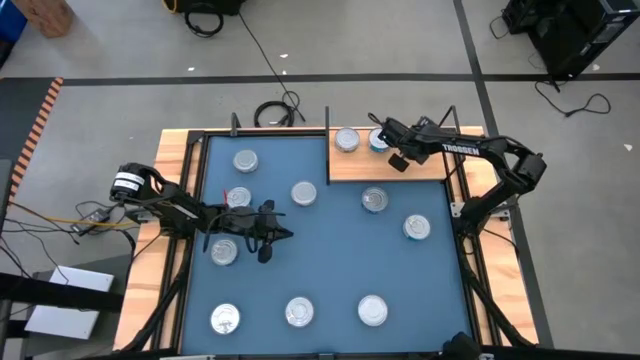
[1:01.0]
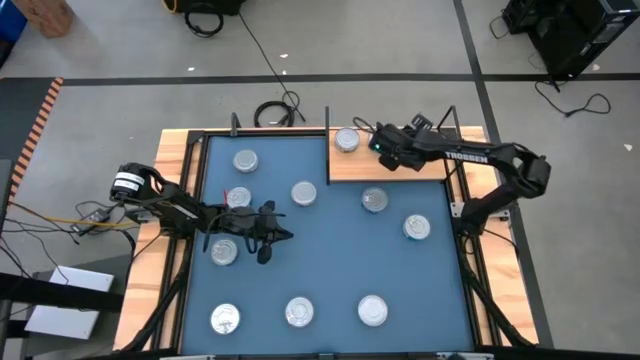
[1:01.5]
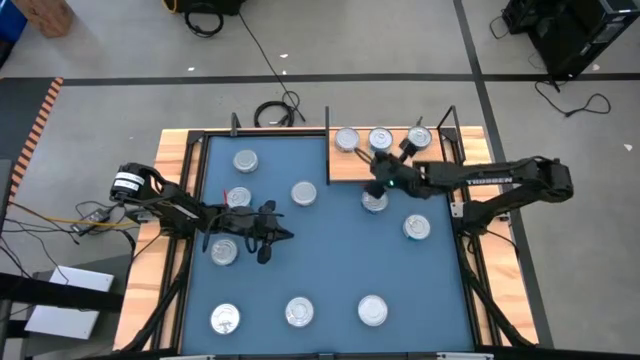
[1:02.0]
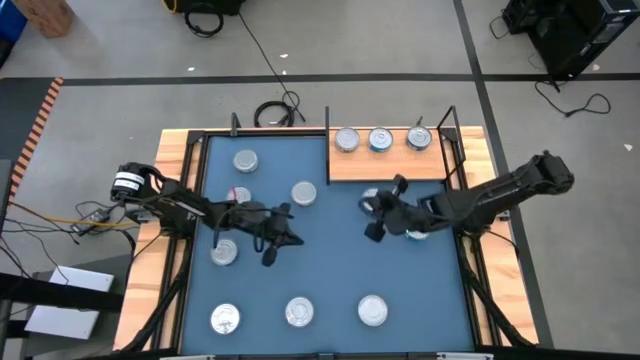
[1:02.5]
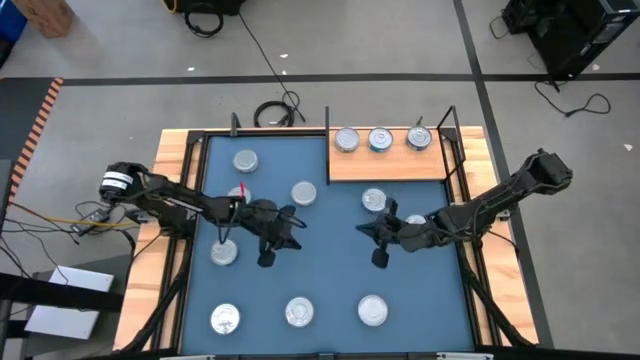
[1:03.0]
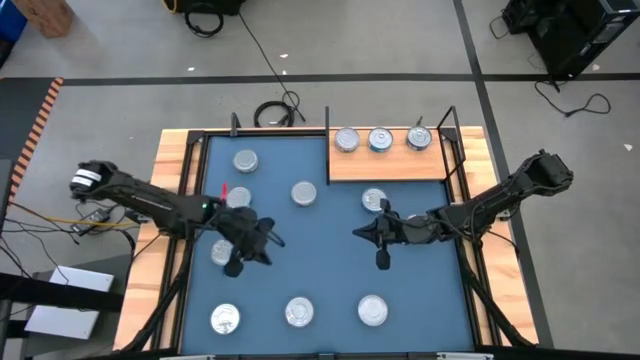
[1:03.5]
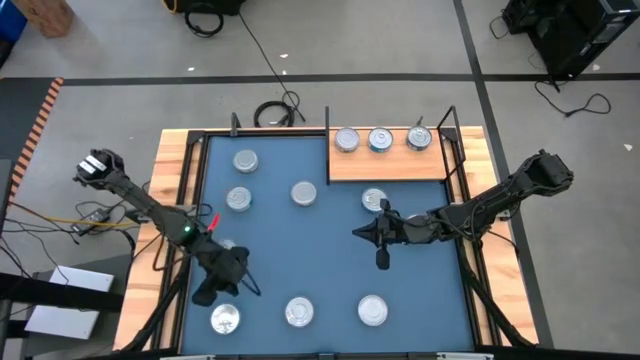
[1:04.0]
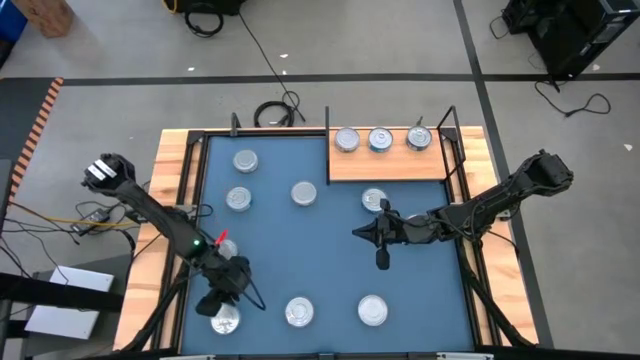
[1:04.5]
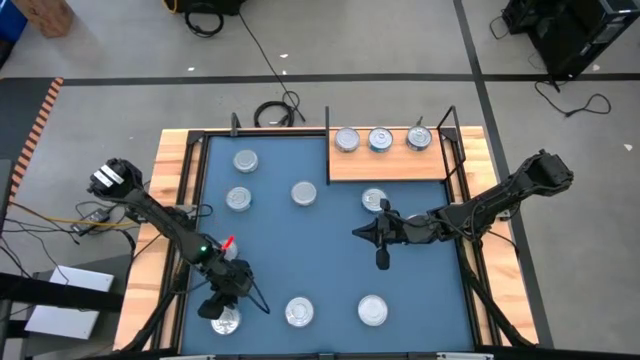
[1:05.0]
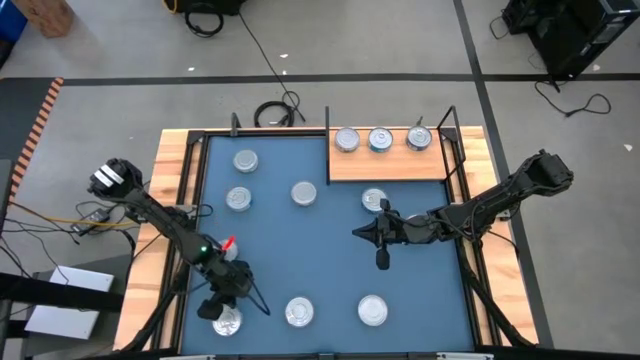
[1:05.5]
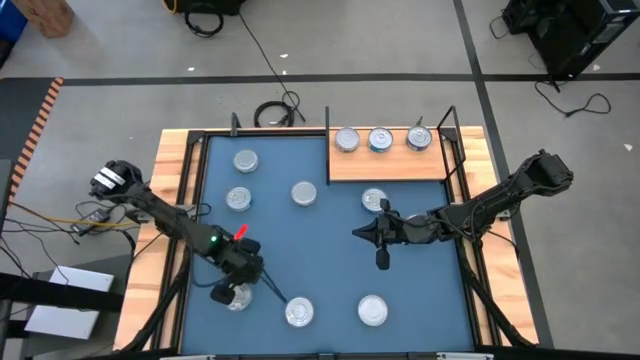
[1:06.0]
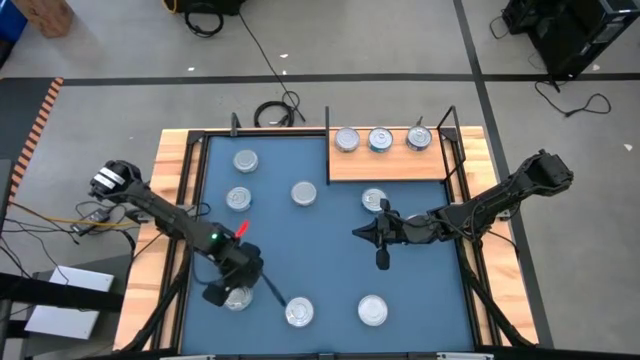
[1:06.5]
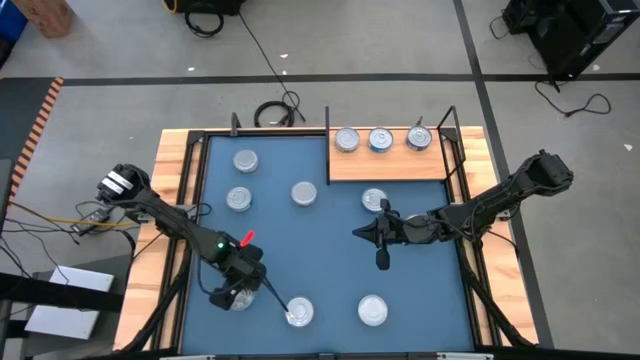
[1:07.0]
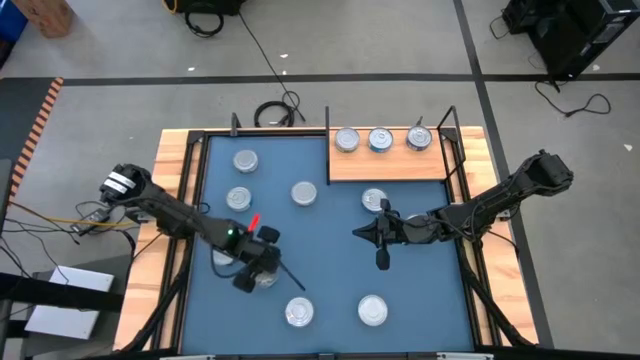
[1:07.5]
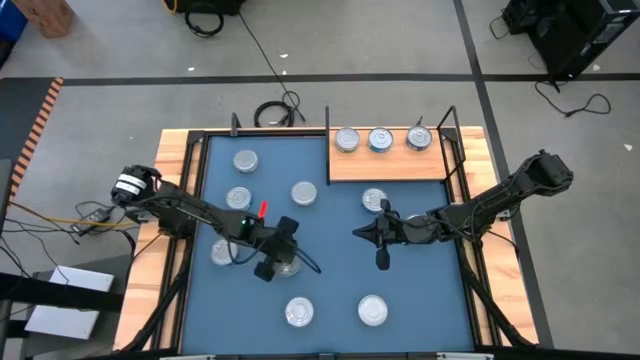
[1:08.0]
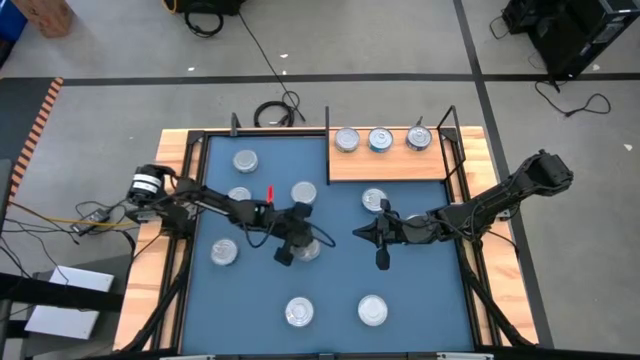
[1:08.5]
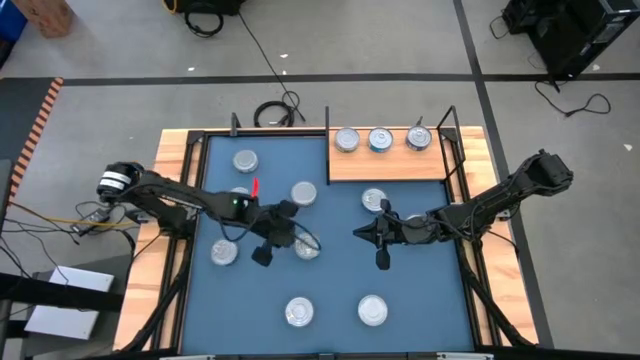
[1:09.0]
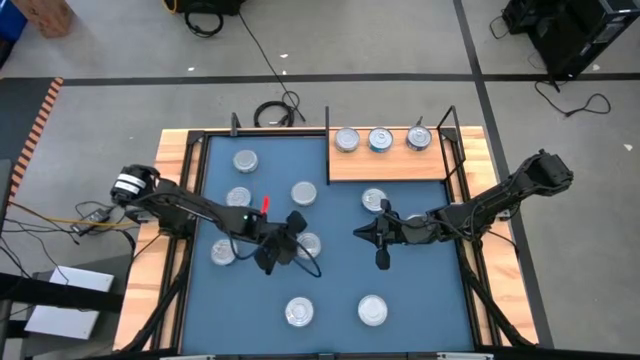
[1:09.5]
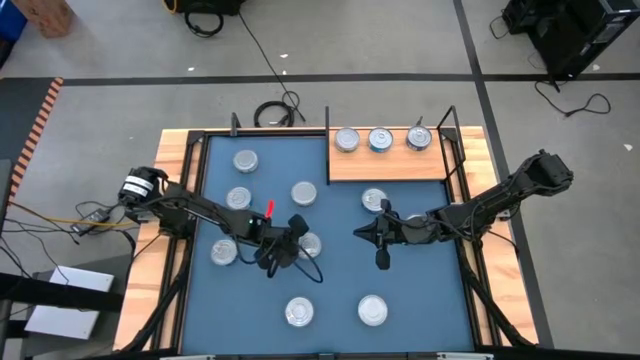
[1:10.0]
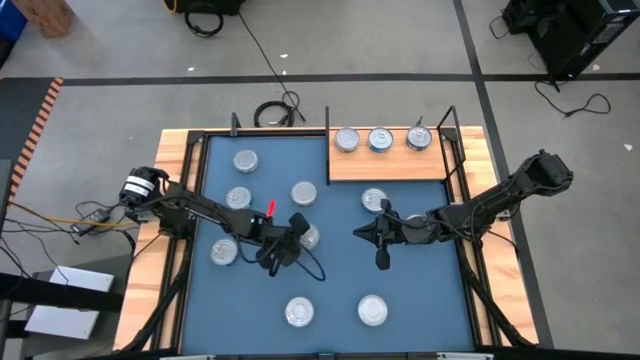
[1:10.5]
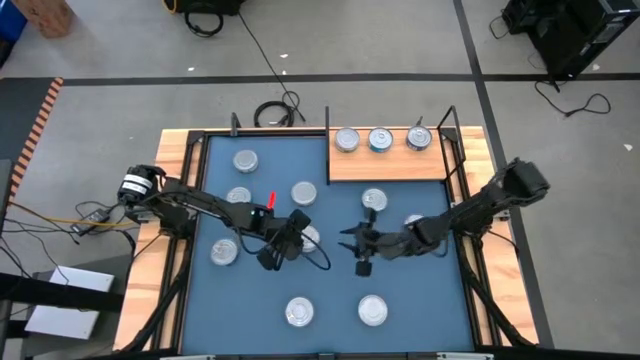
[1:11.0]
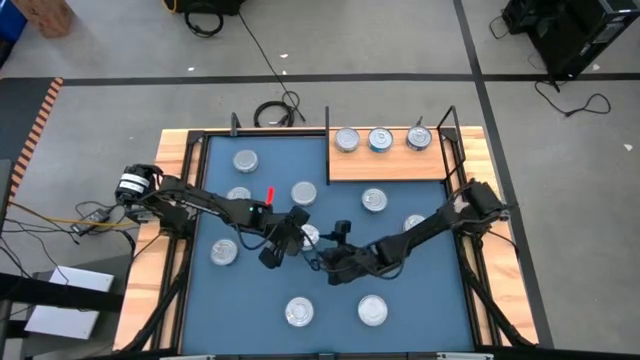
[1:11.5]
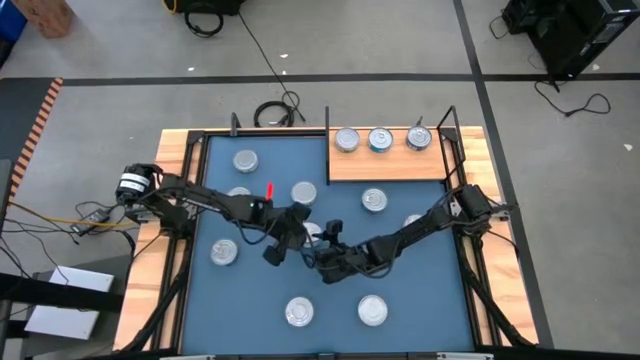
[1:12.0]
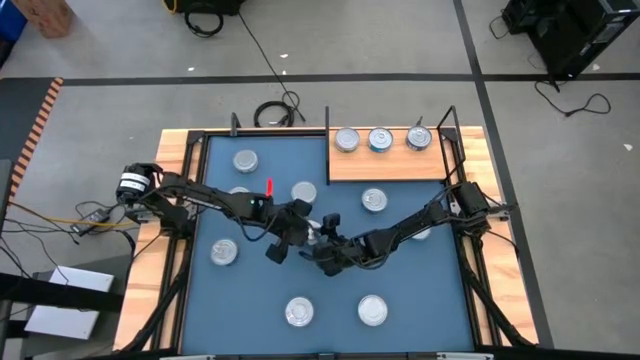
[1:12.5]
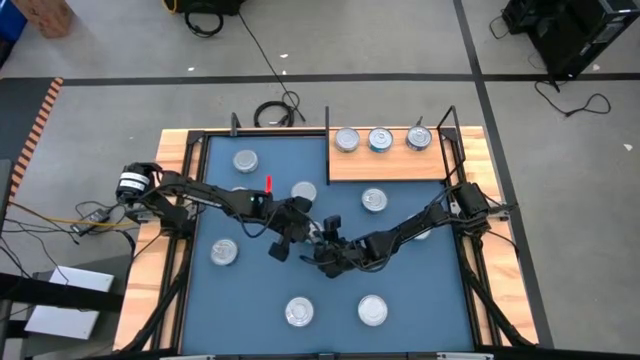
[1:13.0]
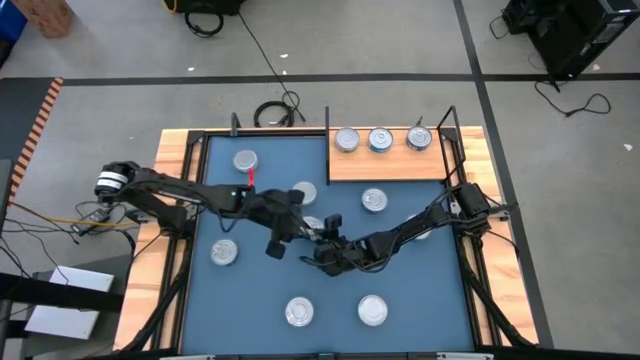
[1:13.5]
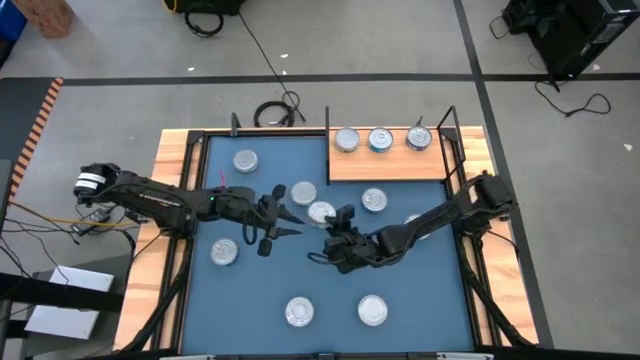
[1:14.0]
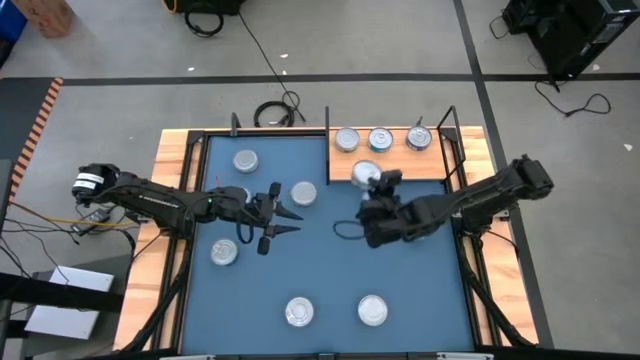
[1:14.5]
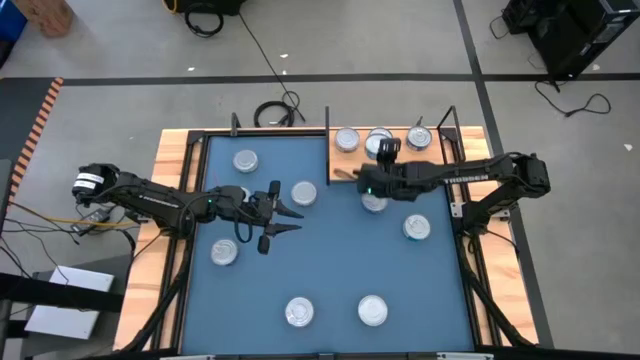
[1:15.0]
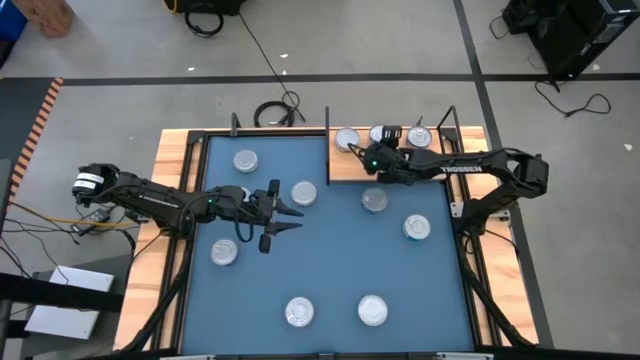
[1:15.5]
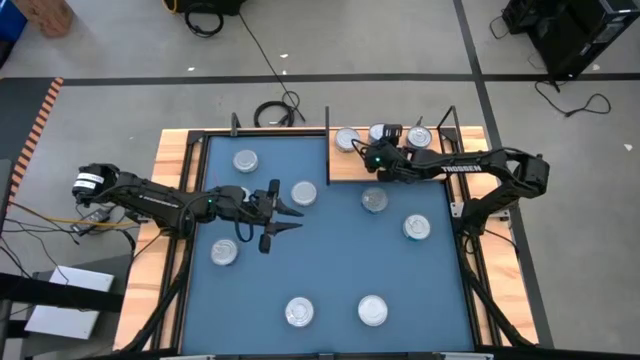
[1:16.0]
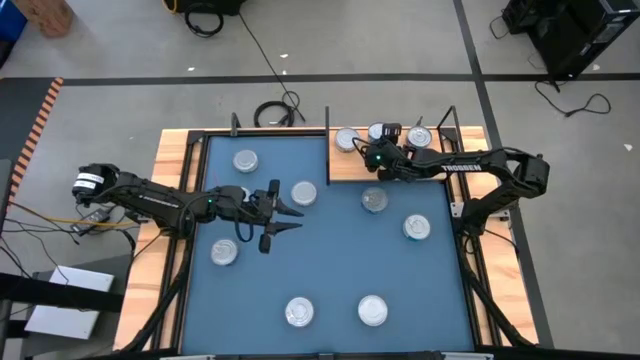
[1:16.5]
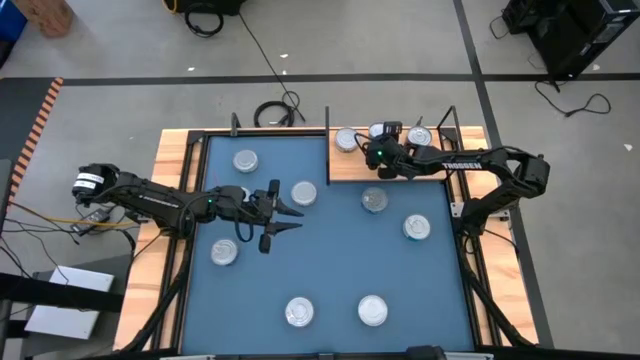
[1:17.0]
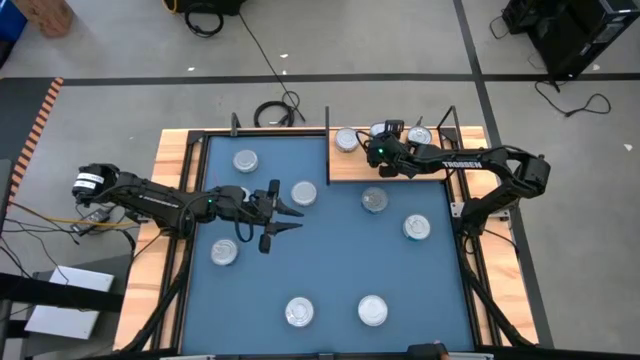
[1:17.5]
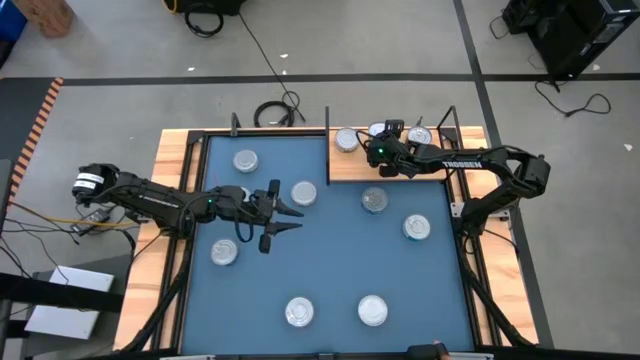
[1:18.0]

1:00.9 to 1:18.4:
Task: Stack canned seafood by type on shelf
Stack the bottom left yellow and blue tuna can onto the other yellow and blue tuna can on the shelf

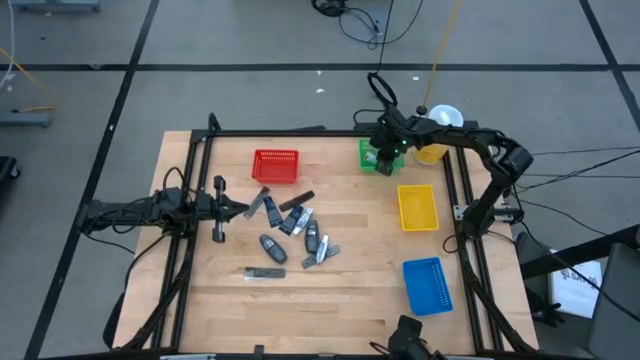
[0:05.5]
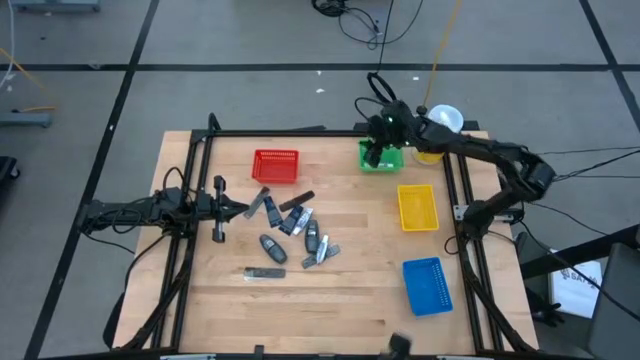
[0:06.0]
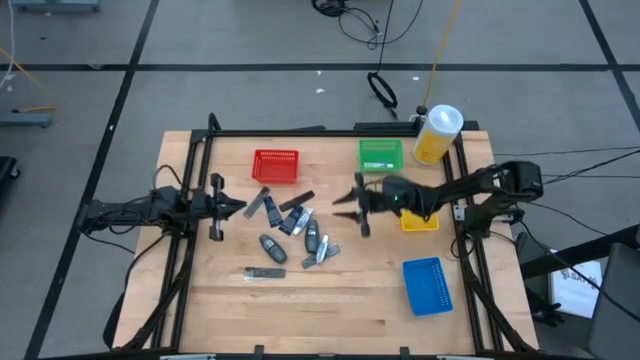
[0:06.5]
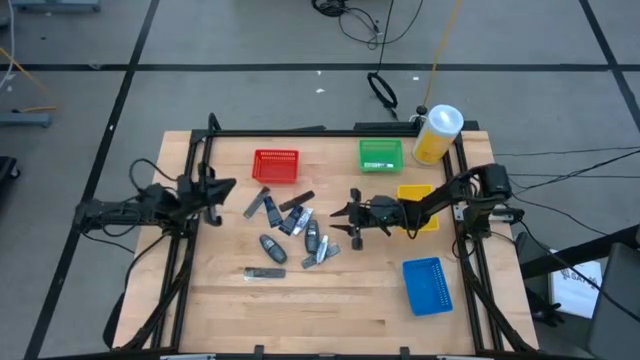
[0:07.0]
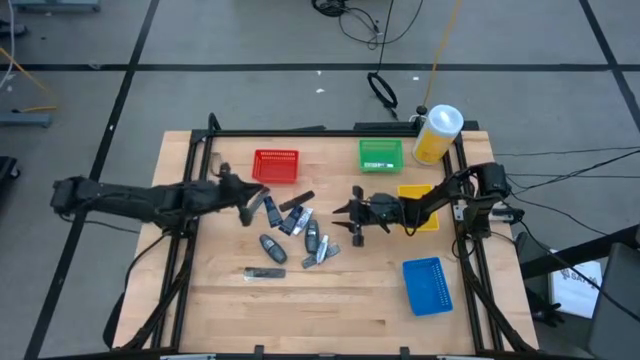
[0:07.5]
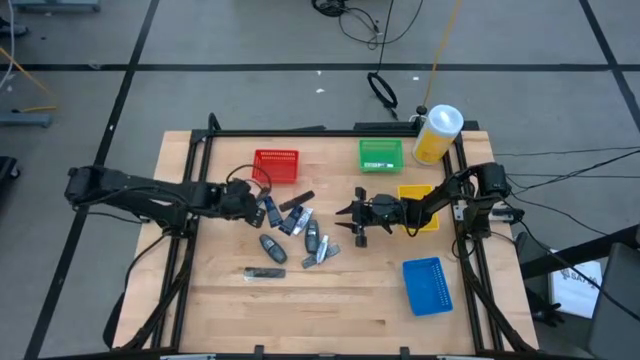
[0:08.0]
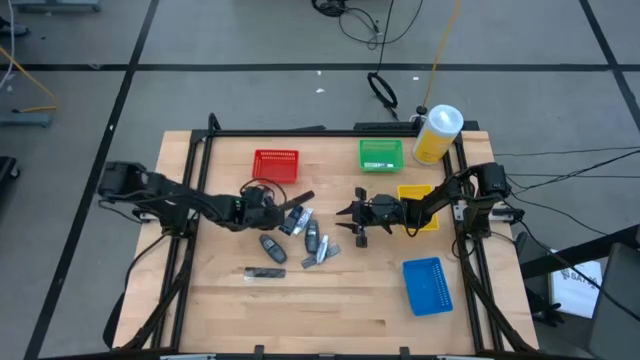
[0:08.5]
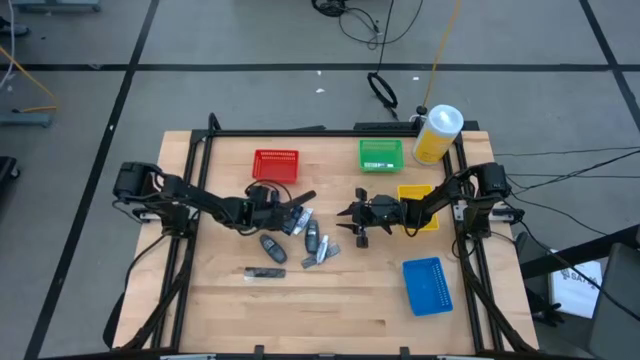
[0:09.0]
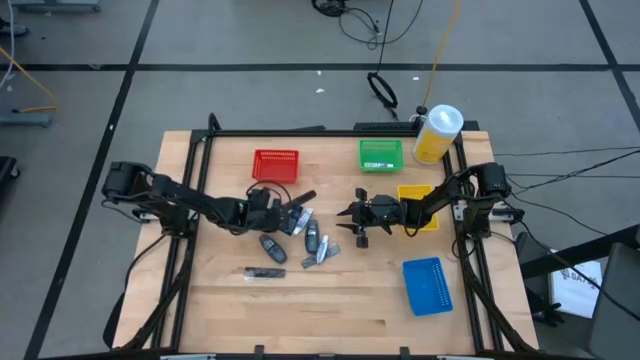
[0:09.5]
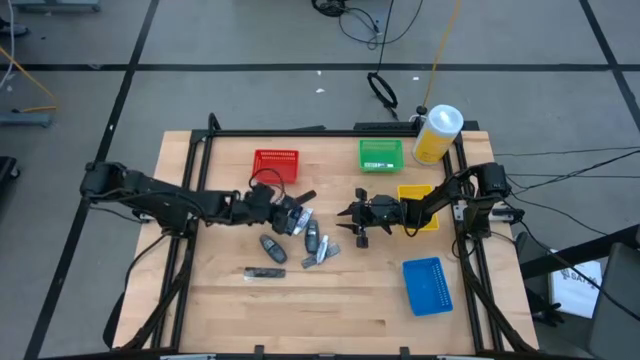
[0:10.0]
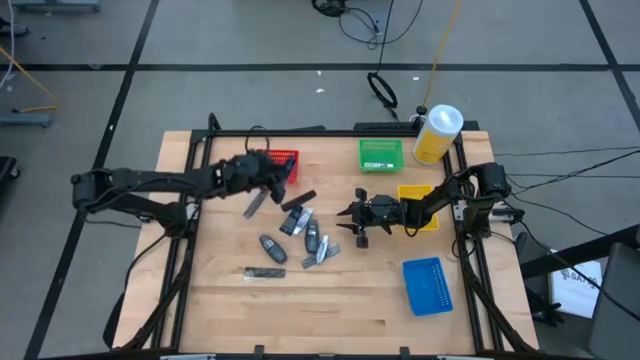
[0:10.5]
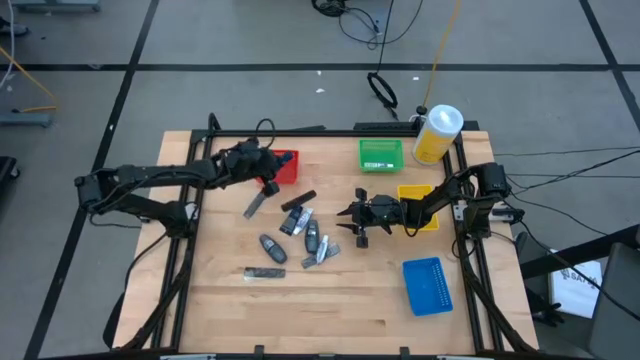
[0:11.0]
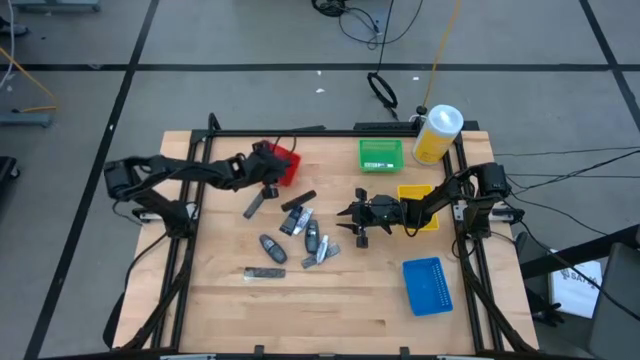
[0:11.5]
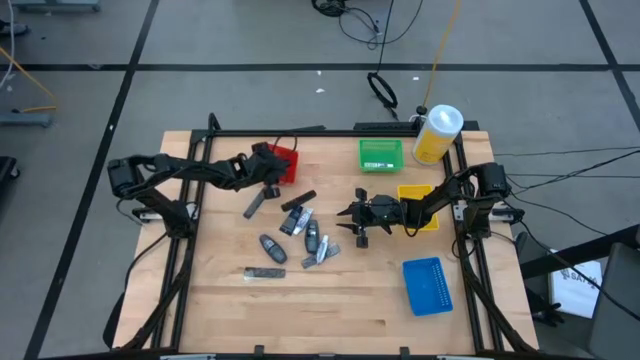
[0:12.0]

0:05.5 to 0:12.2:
Task: Pick & Place Travel size toiletries
Put the blue shave cream into the red bin
